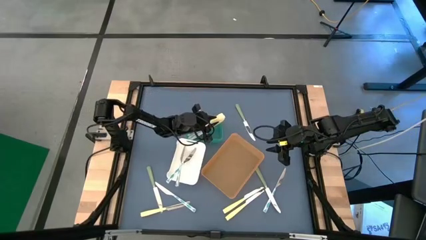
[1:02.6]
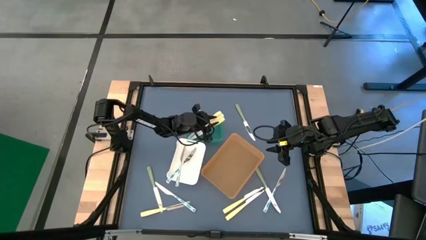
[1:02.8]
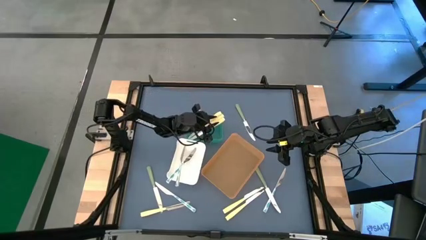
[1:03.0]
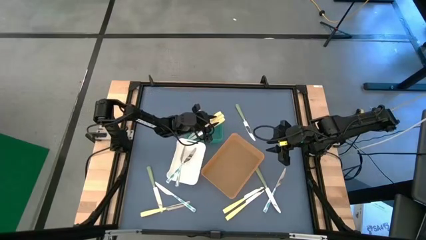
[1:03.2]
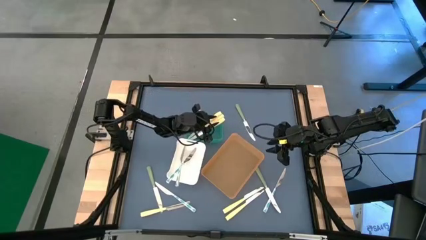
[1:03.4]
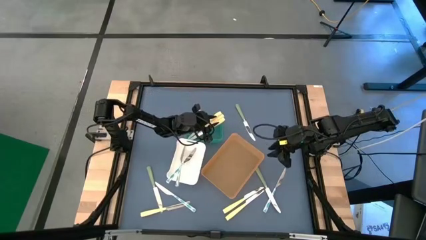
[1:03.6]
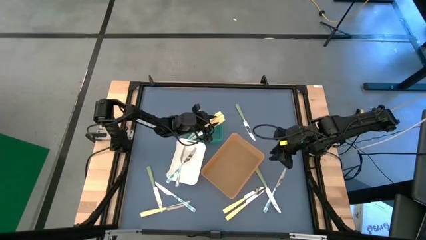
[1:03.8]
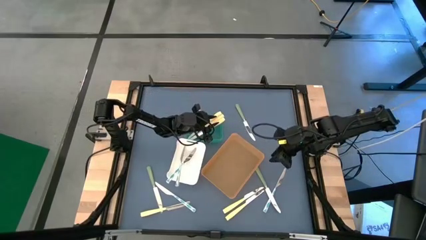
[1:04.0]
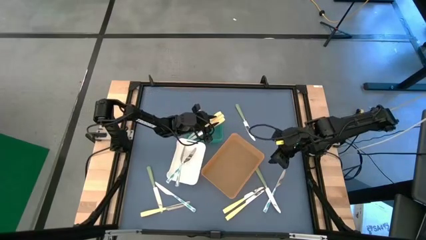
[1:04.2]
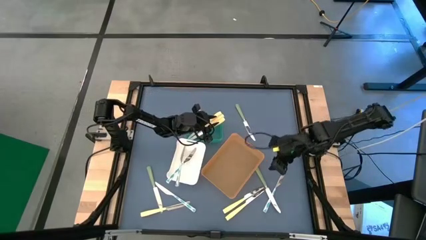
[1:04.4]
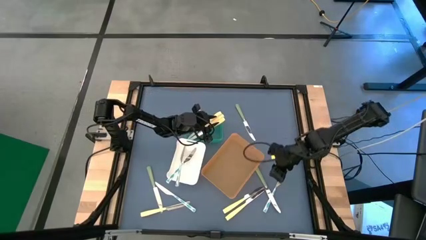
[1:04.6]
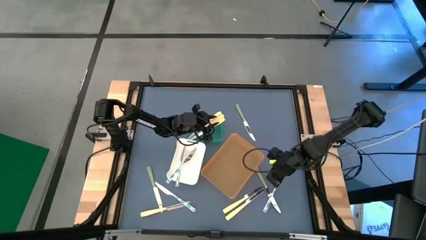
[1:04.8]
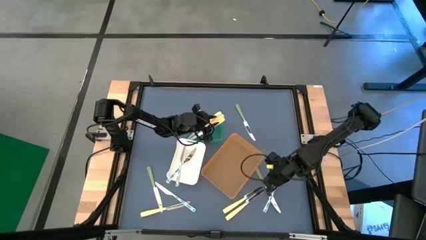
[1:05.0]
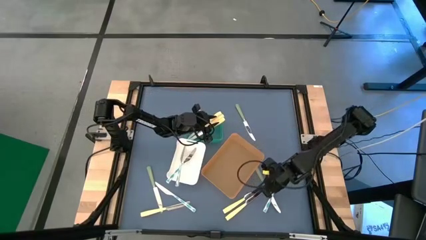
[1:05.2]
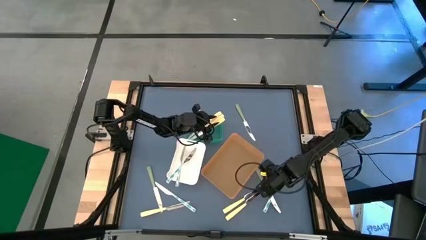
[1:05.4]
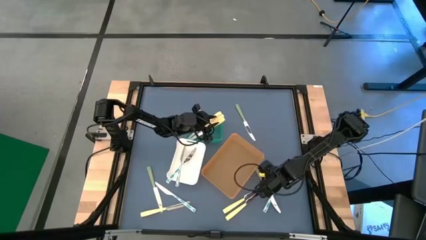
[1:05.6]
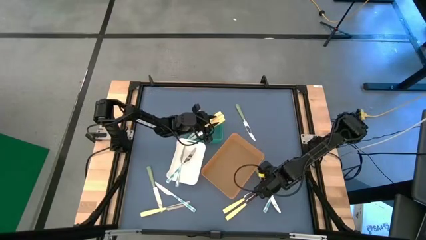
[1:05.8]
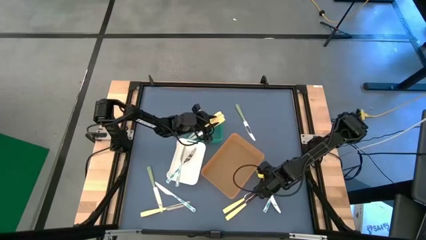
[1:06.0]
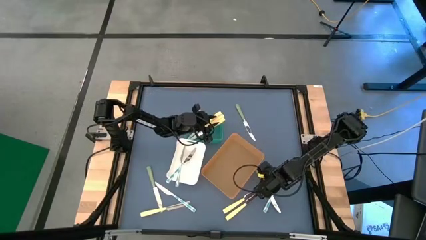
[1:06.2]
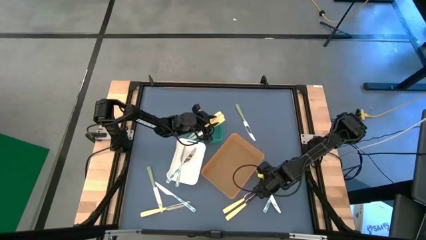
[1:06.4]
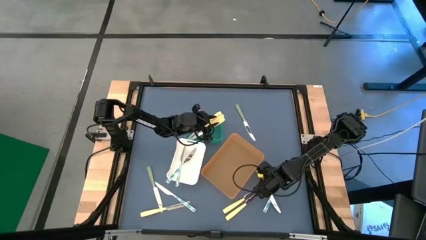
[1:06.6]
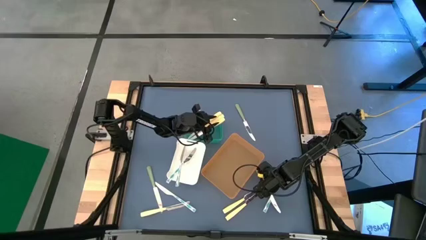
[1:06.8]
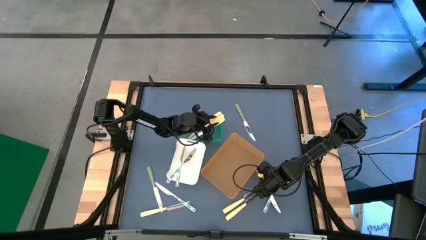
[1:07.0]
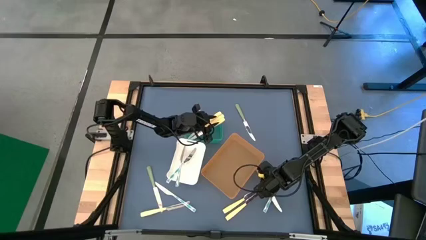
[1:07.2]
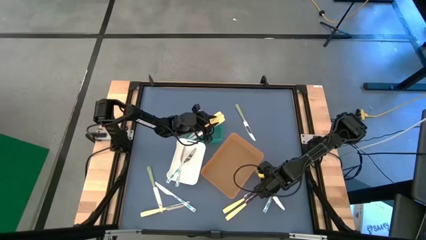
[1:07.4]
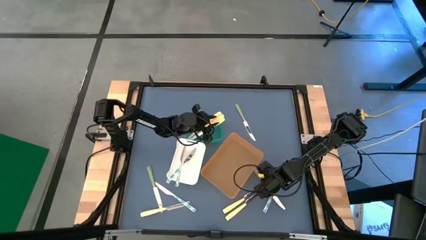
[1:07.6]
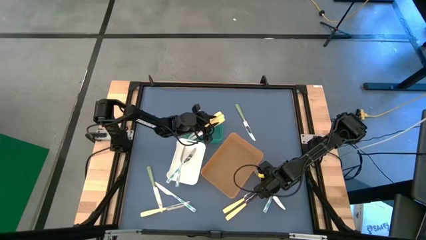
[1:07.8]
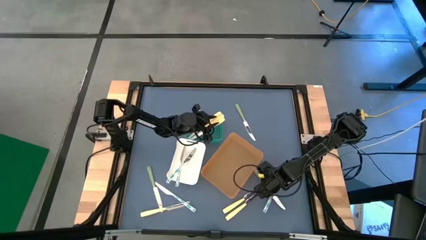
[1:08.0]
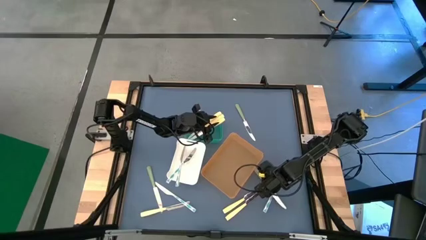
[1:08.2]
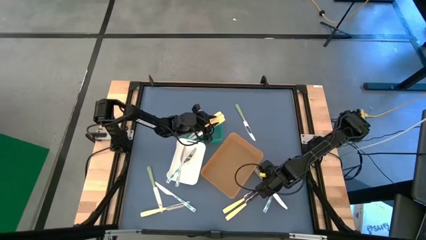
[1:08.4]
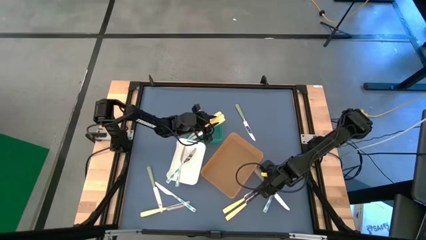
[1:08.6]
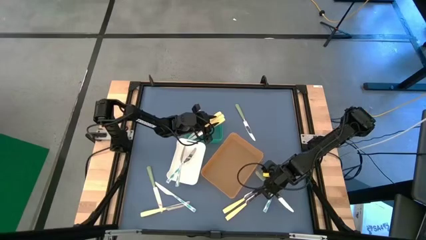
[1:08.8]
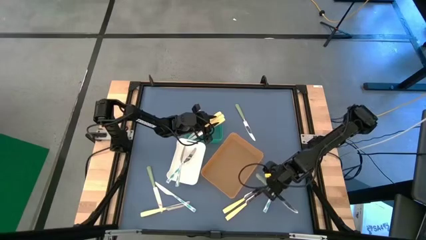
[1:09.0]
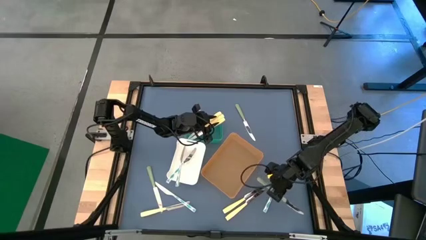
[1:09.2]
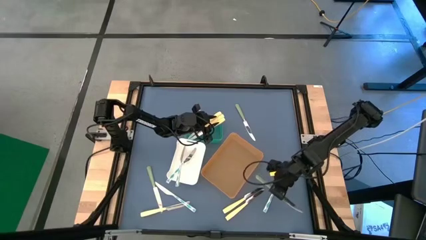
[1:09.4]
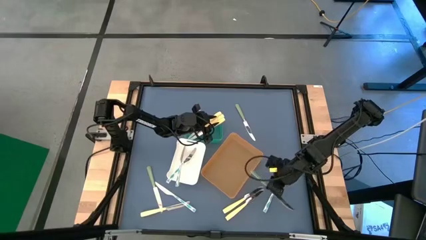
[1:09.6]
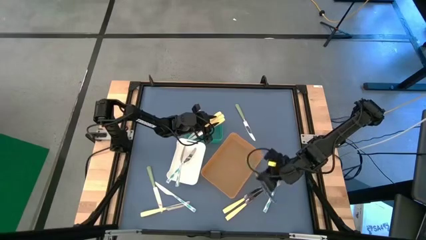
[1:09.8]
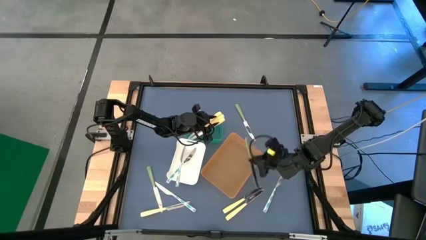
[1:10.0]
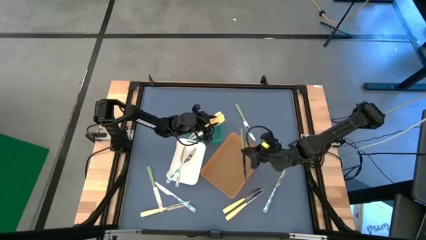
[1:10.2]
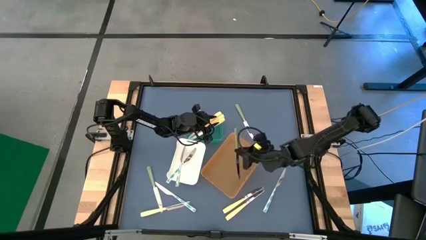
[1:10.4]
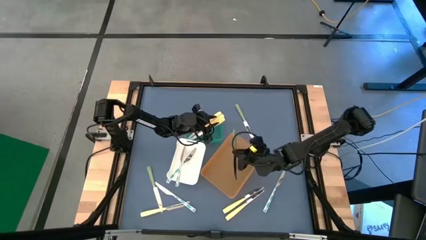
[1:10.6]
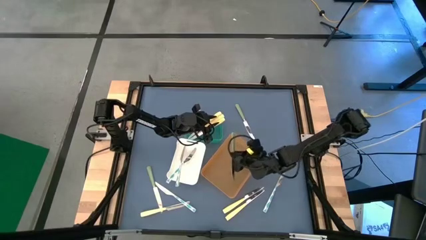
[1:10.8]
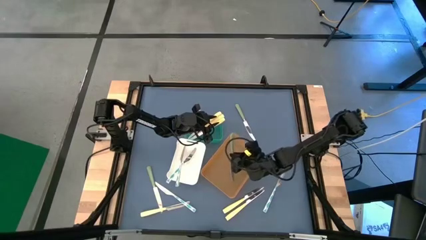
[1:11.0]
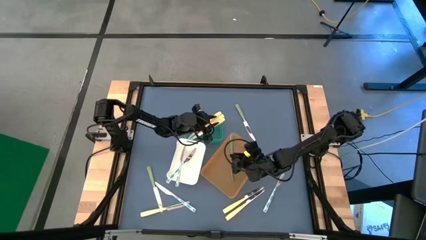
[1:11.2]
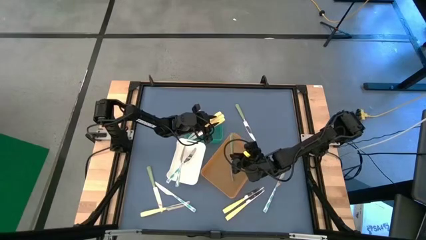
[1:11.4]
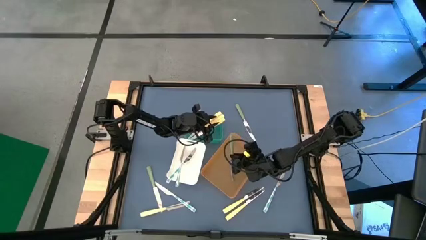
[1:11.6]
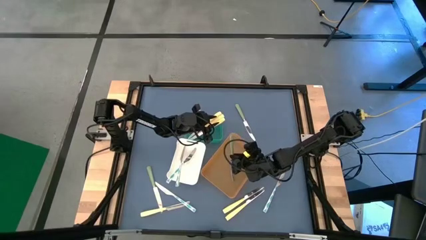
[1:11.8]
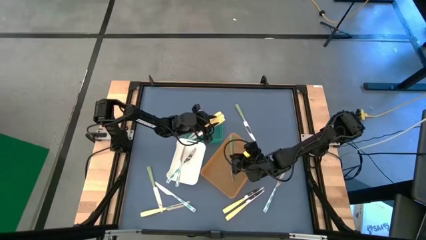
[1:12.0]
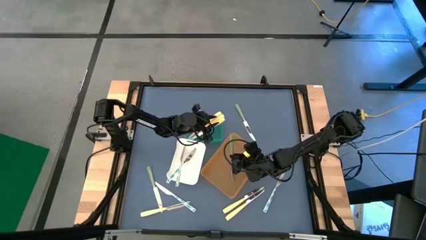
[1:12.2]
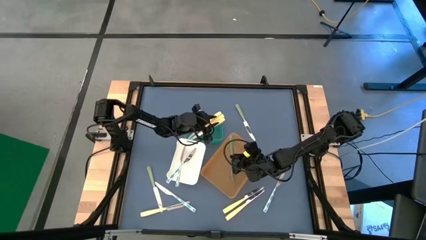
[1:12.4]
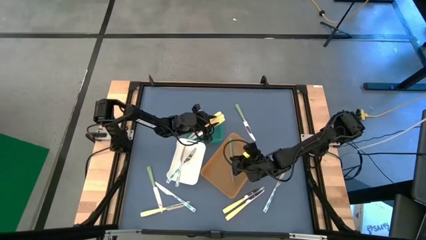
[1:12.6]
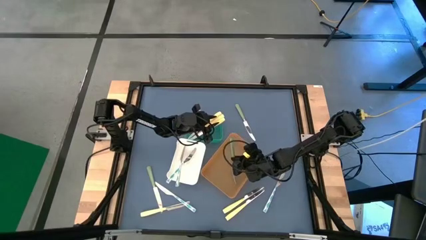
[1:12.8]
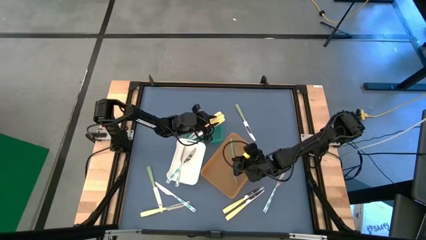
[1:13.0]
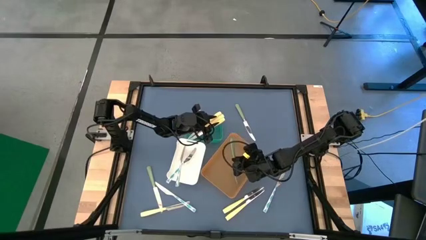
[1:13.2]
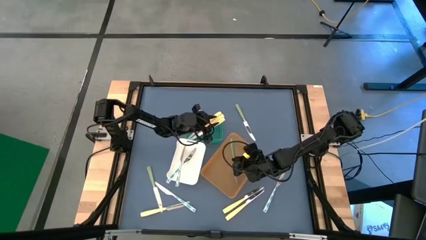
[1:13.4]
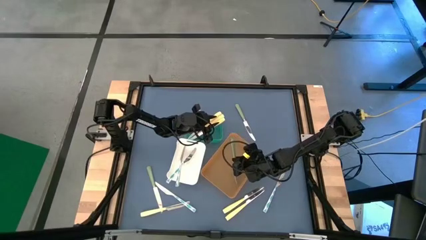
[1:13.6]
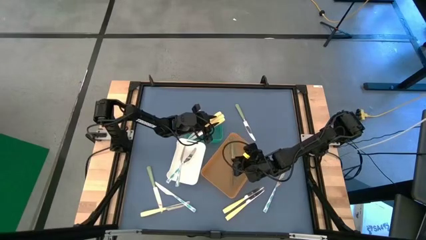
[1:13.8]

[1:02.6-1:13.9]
Task: Sort silverware by color (type)
Put the green knife into the orange bin
